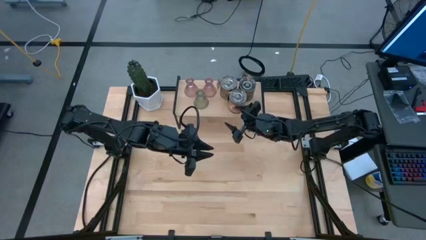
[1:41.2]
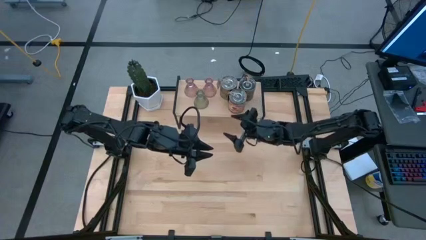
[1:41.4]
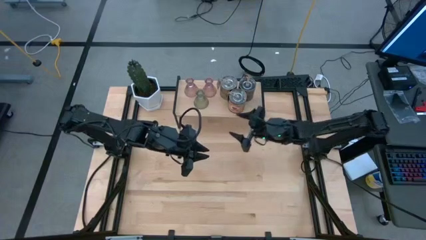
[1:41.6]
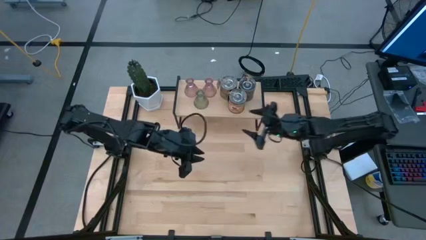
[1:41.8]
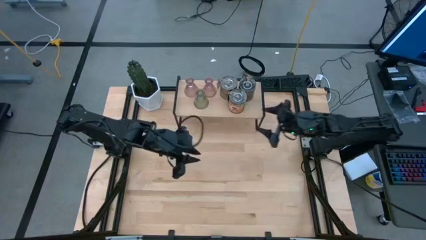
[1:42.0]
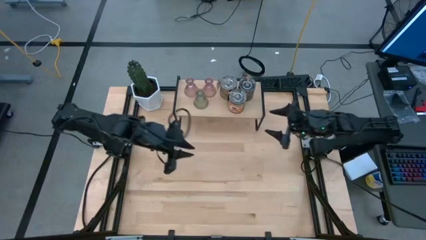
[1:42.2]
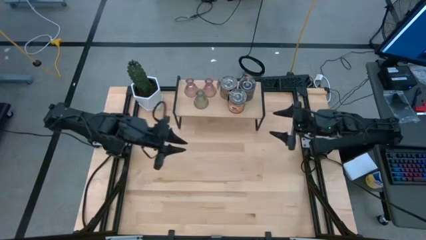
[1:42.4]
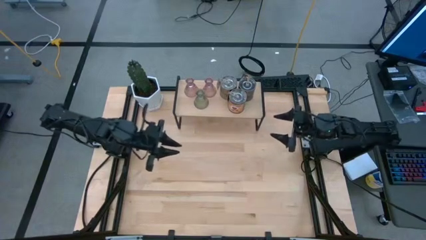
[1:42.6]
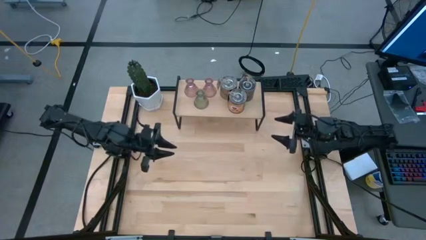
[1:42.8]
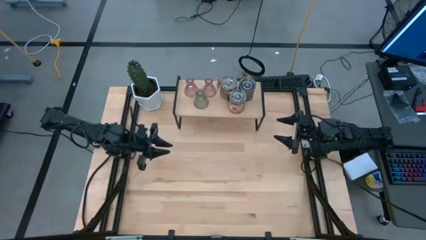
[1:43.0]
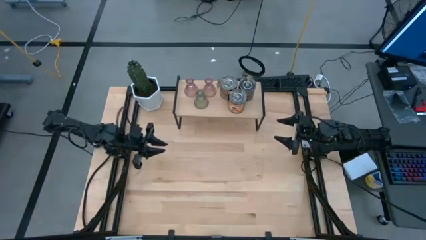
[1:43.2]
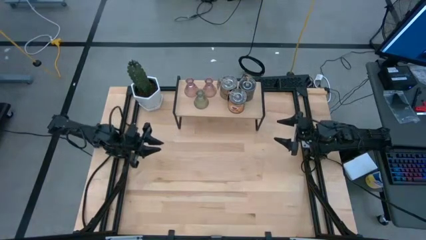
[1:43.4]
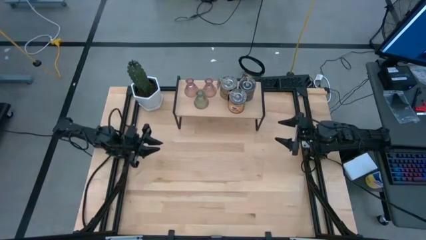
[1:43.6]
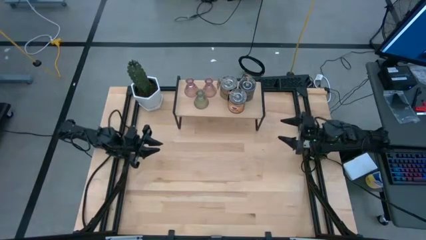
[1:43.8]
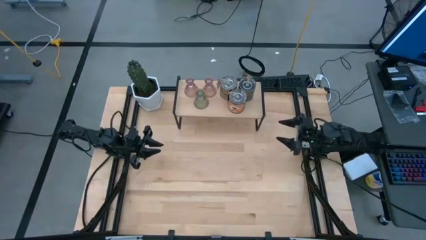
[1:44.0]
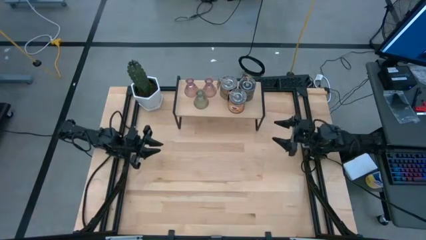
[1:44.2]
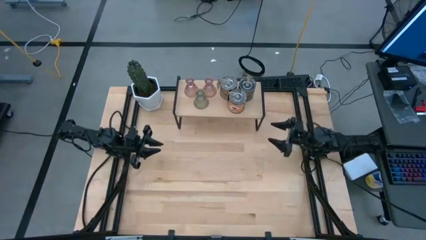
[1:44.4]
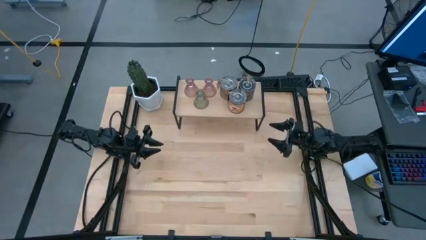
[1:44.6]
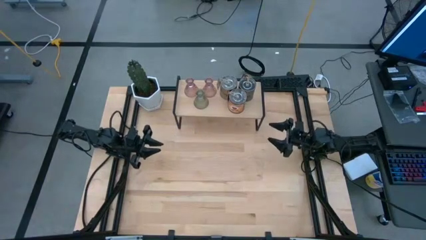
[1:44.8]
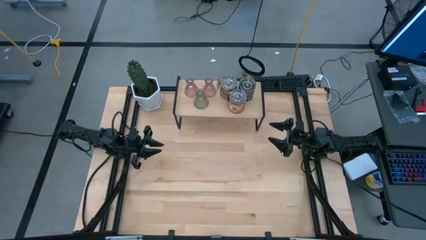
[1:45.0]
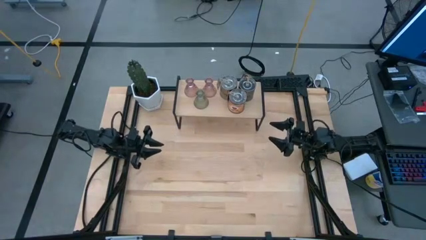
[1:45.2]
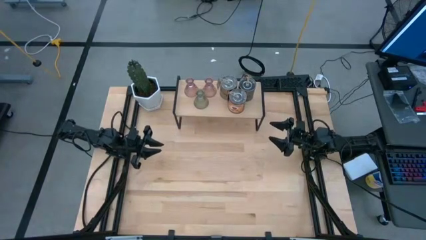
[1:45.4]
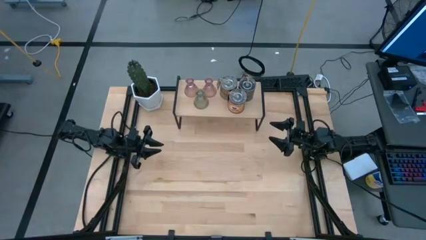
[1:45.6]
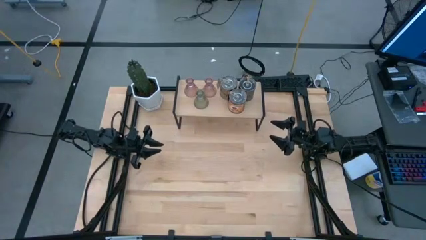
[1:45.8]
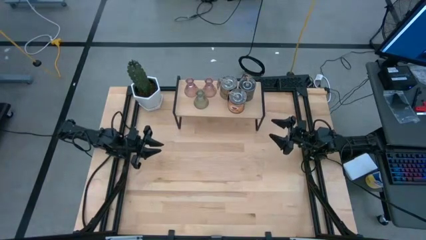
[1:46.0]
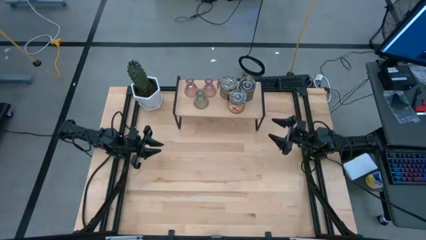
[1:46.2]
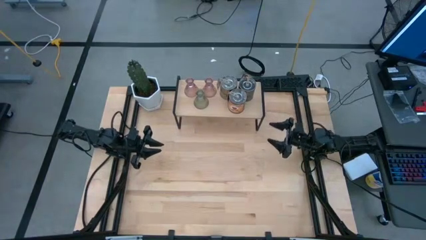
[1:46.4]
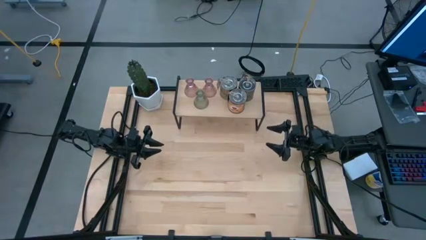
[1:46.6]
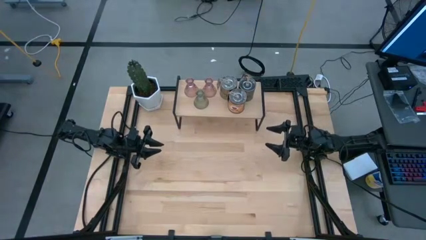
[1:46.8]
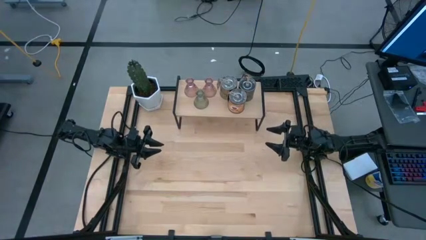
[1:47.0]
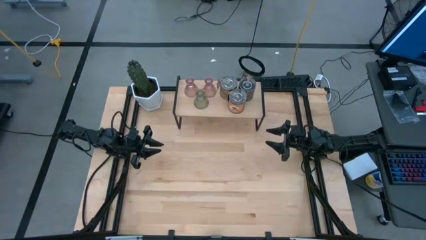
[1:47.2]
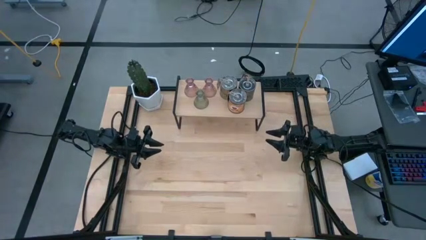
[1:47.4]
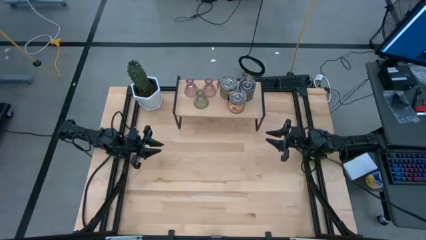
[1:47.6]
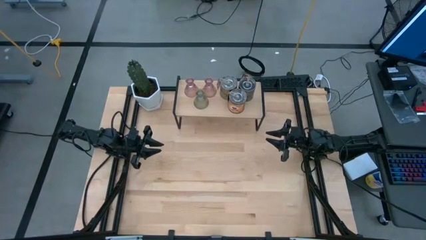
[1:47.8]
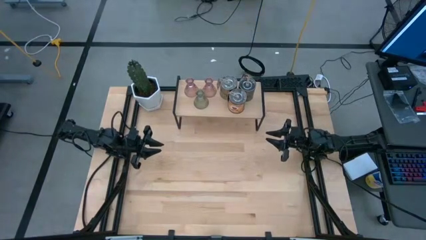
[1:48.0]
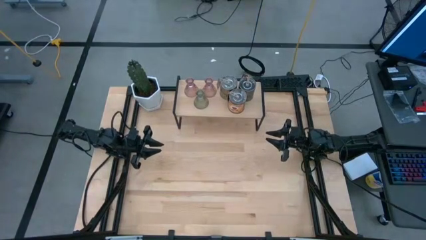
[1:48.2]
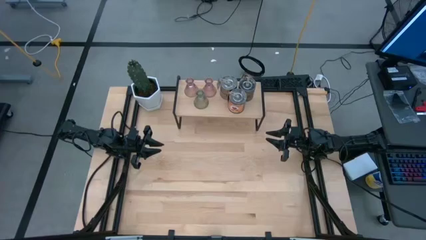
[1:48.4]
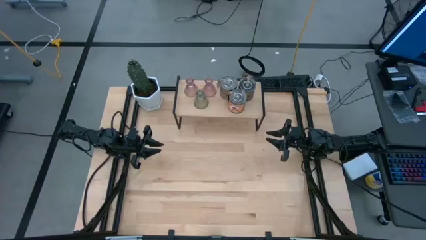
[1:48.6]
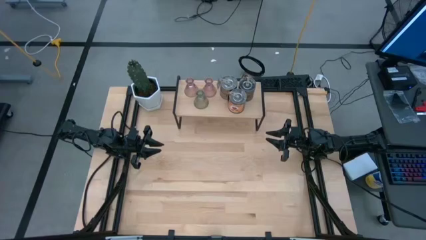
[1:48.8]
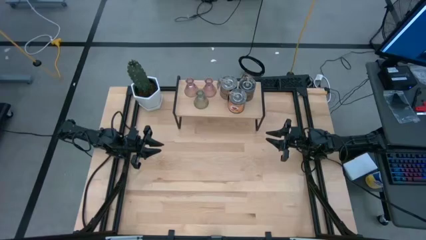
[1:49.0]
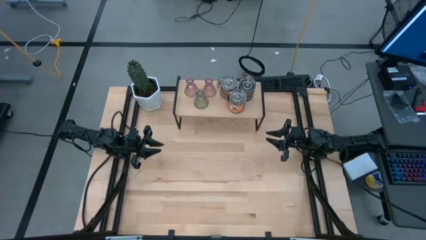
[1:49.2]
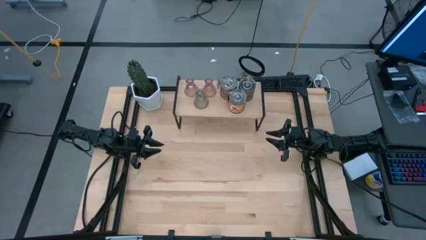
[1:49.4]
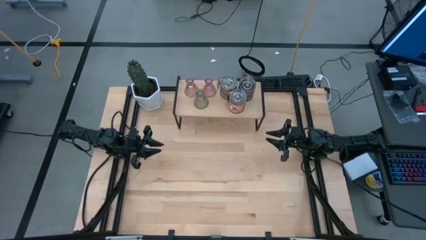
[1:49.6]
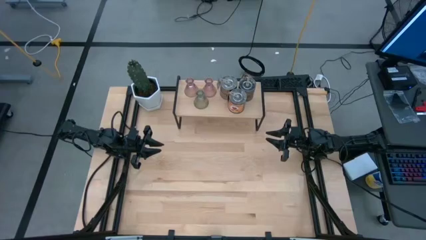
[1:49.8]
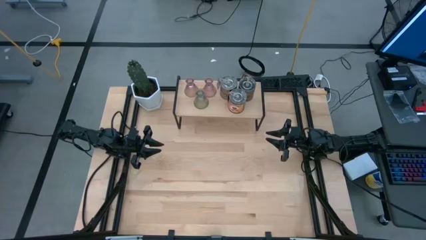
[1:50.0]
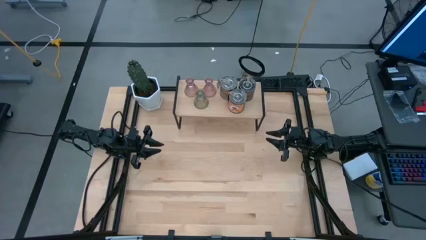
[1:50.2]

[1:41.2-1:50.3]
Task: Pick & Place candle stick holders
Return to Home Position

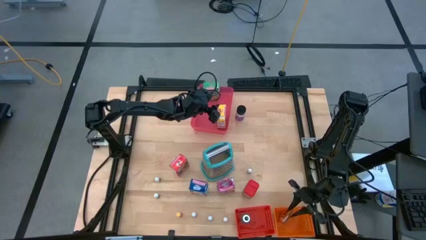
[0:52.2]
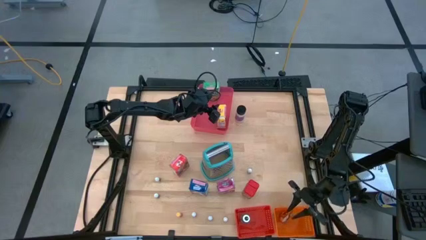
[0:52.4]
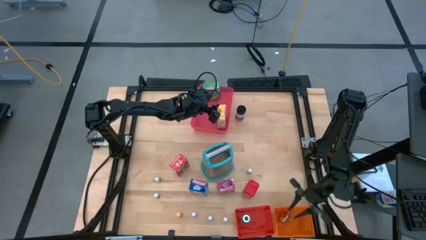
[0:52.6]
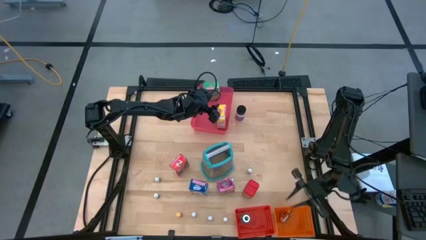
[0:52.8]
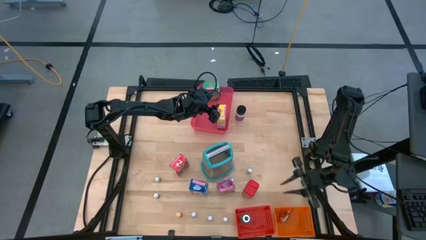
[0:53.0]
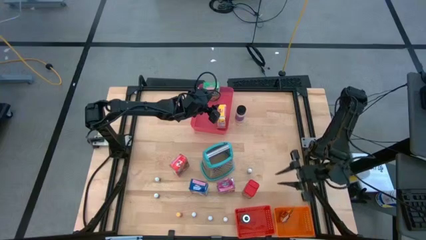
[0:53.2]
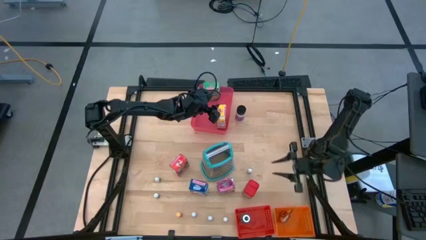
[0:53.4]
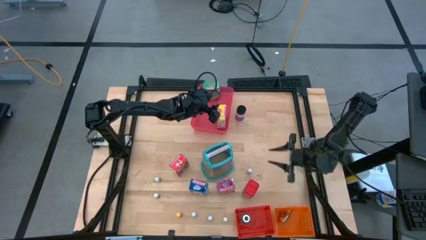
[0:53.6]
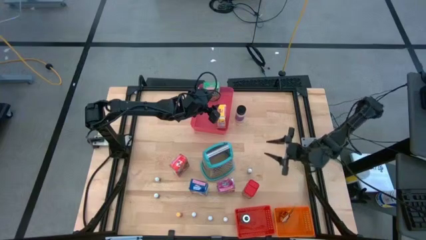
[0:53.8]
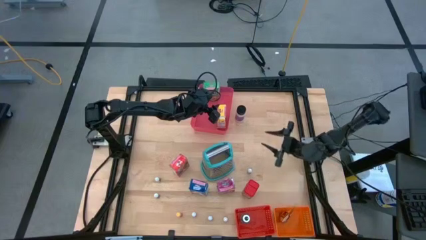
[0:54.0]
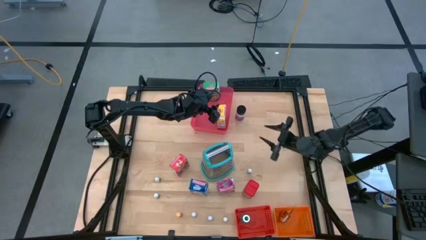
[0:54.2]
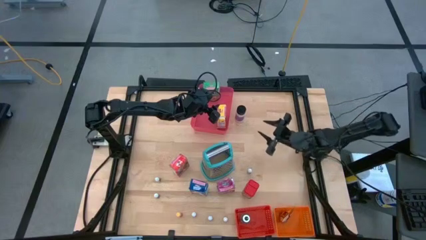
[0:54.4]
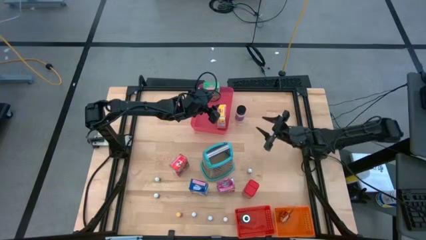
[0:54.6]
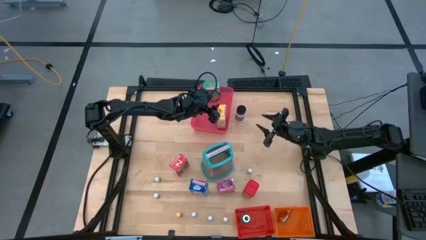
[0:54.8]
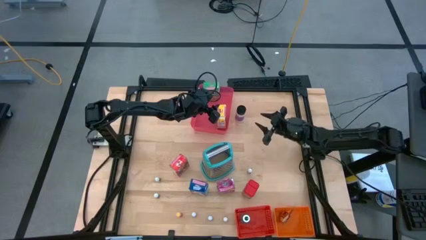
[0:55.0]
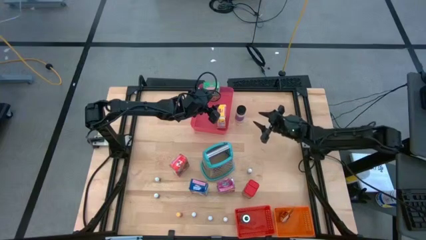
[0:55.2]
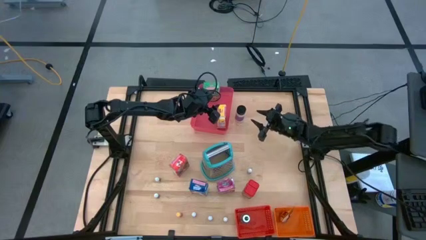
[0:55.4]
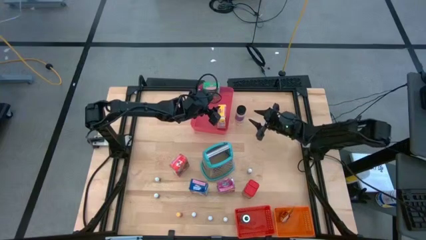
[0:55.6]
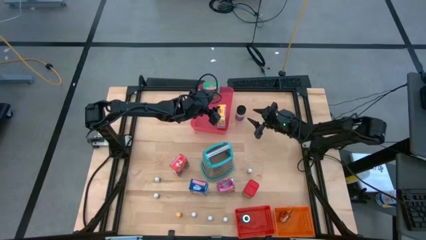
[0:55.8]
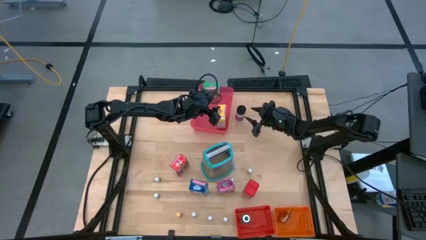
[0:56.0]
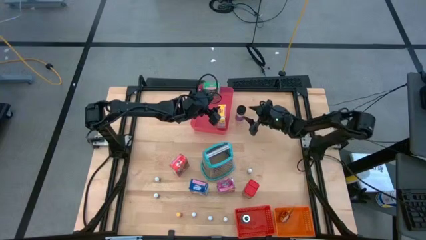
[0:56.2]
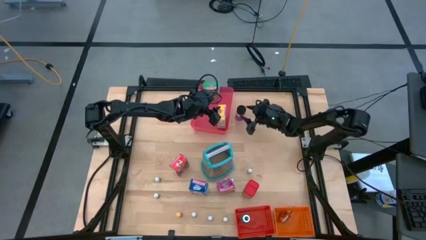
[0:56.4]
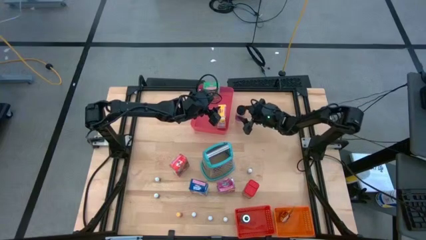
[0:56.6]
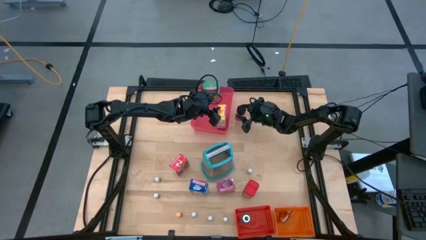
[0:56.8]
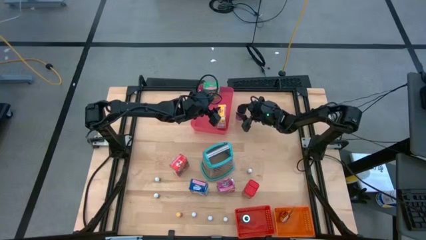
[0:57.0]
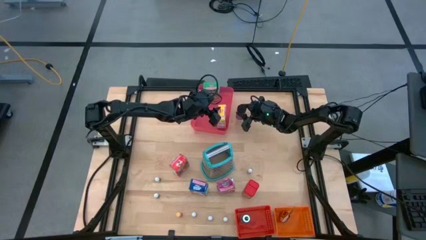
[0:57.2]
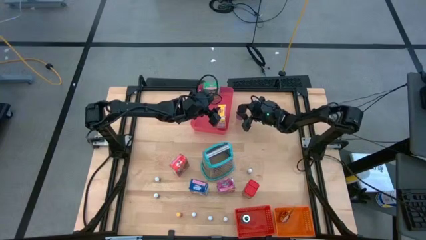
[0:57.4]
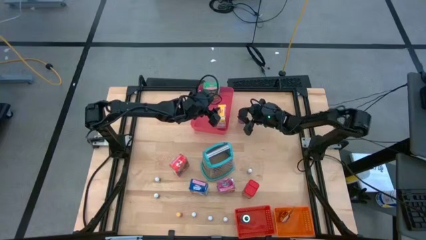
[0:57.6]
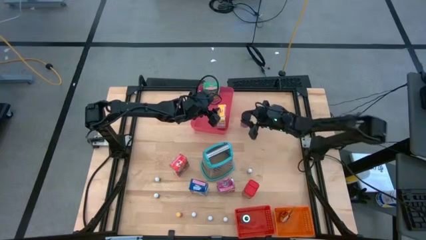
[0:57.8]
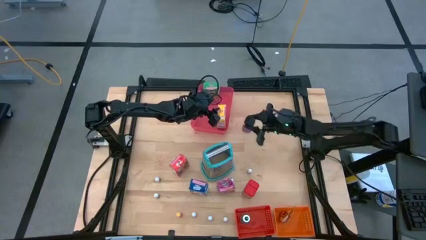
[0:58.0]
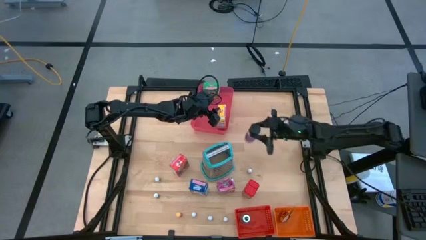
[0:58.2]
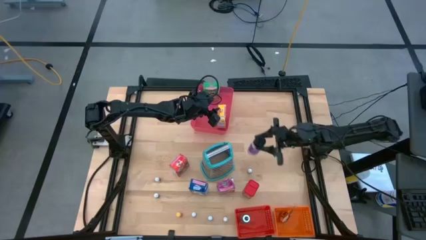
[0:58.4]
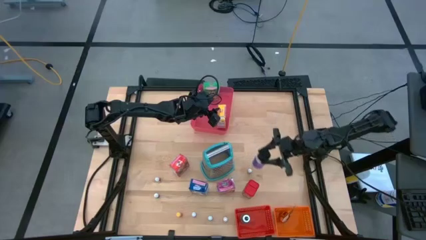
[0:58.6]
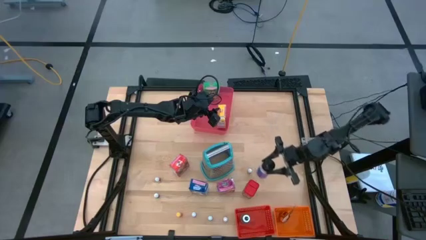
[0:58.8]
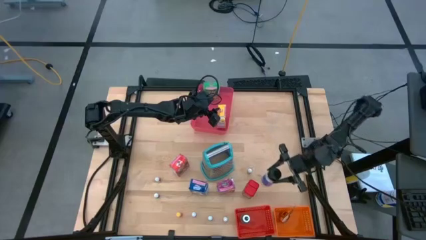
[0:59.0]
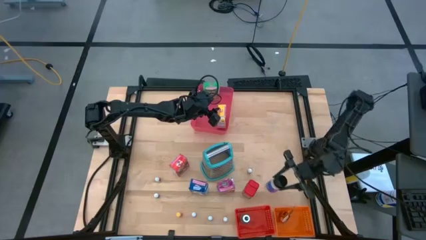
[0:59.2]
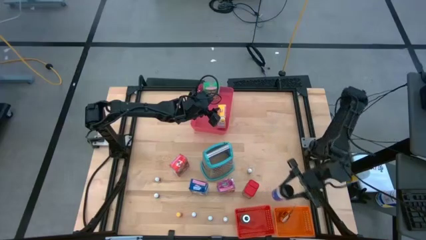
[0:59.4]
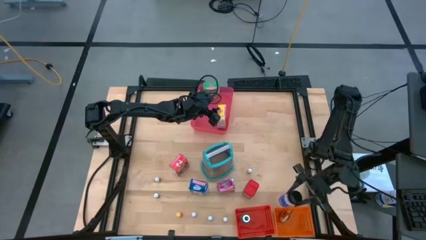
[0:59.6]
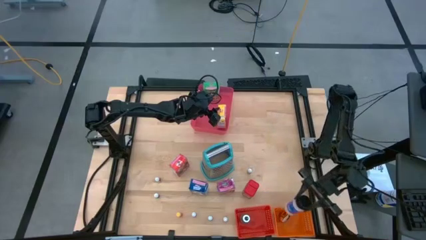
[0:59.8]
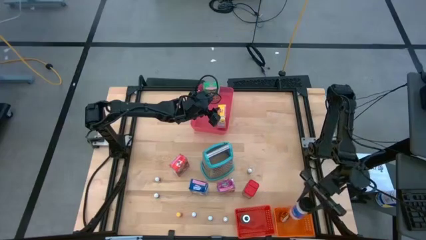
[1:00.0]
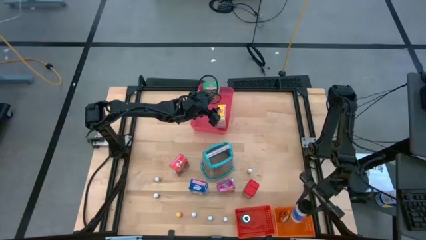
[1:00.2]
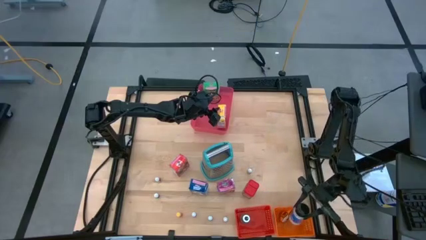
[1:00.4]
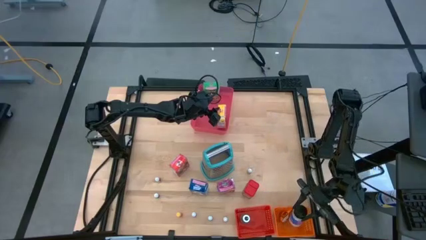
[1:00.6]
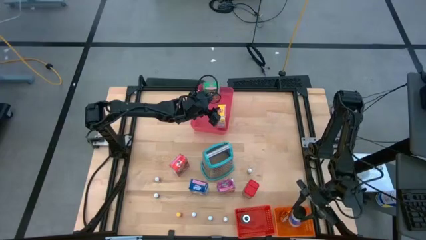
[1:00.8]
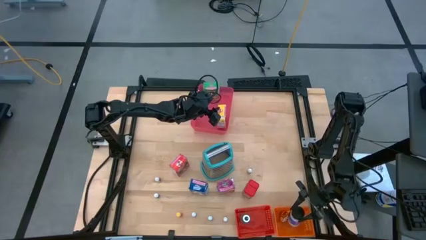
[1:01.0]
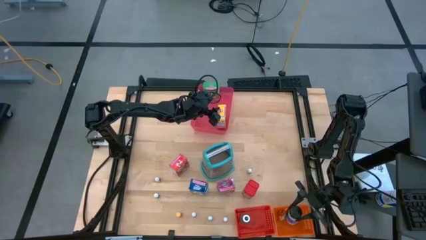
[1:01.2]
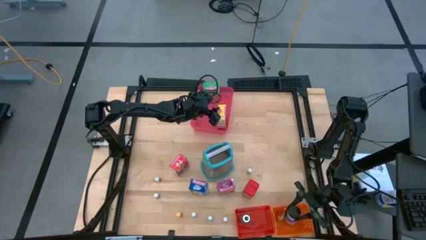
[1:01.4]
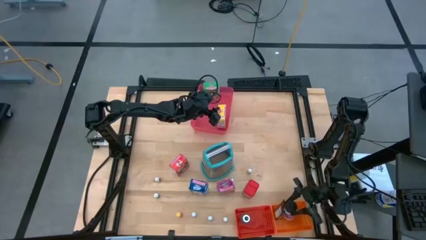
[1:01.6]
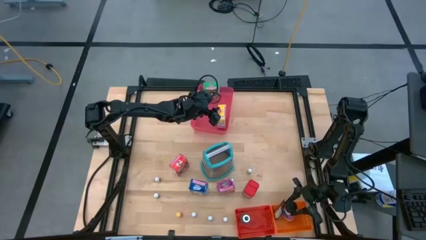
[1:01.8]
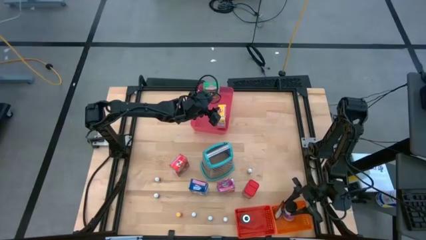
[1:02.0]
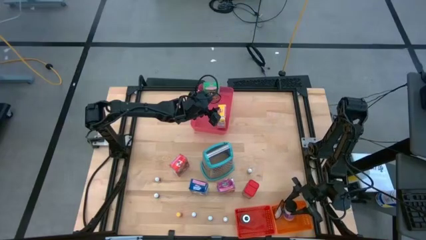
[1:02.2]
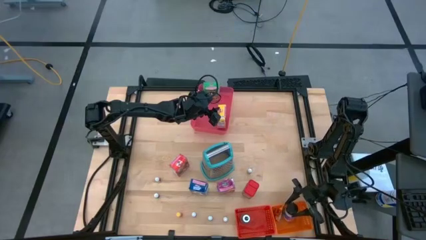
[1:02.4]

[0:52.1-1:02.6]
Task: Pick & Place Kitchen Items
Put the purple seasoning bottle into the orange bin
